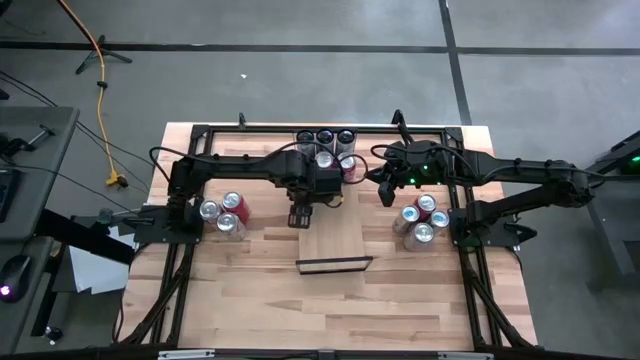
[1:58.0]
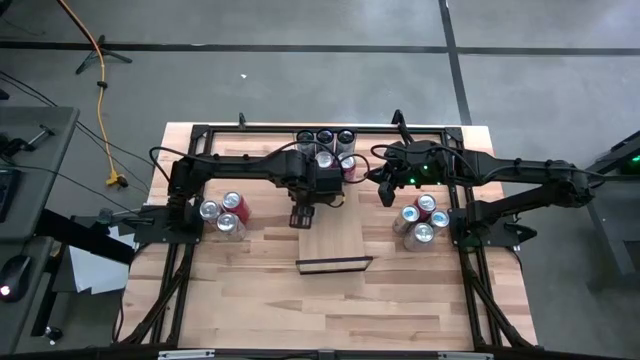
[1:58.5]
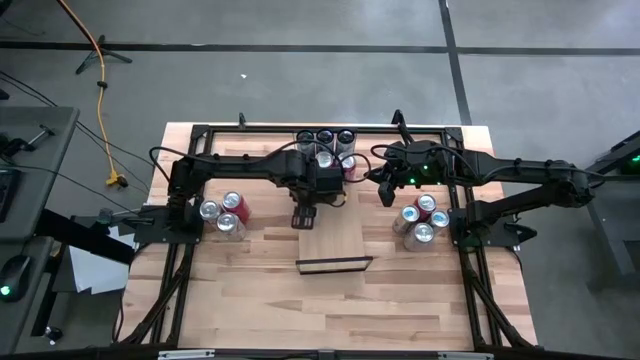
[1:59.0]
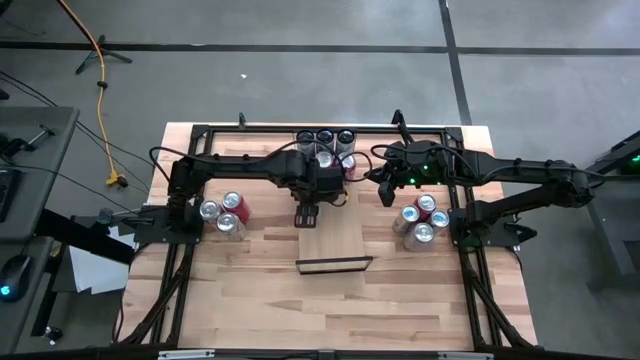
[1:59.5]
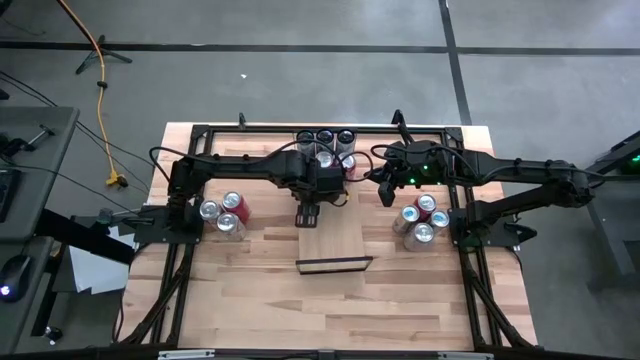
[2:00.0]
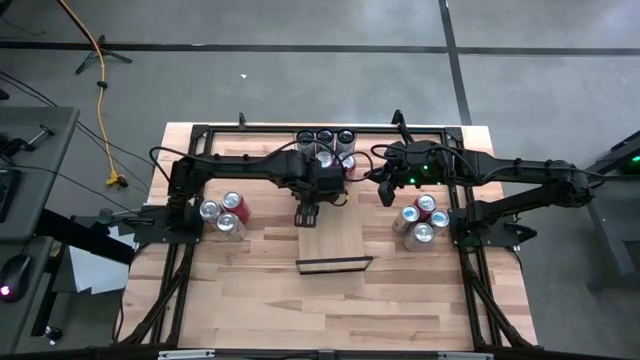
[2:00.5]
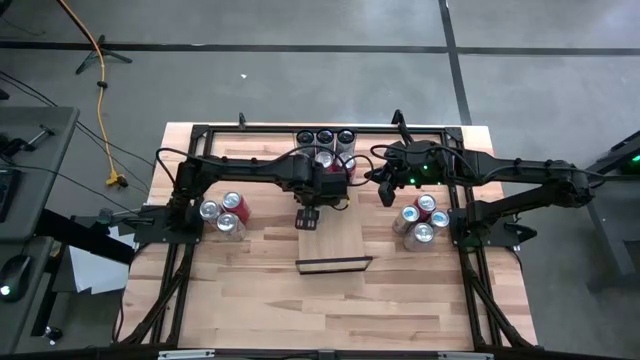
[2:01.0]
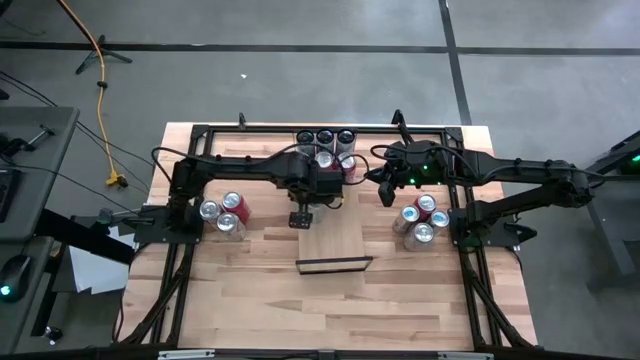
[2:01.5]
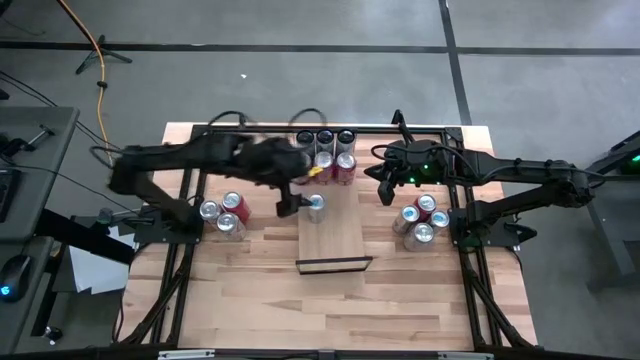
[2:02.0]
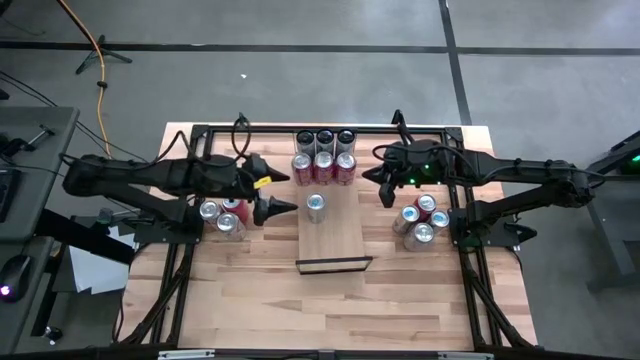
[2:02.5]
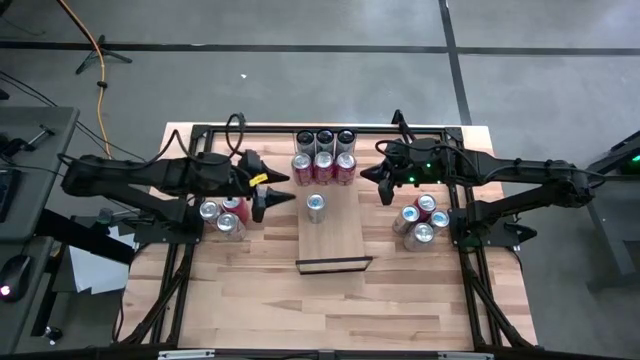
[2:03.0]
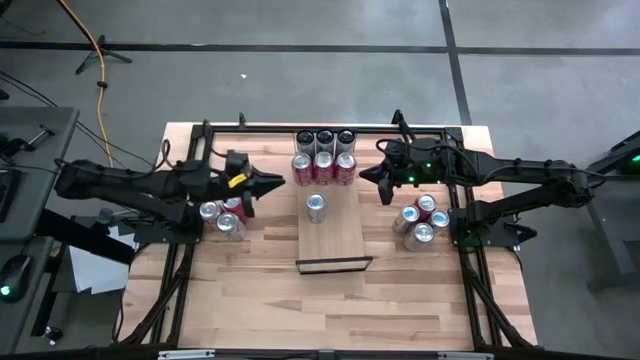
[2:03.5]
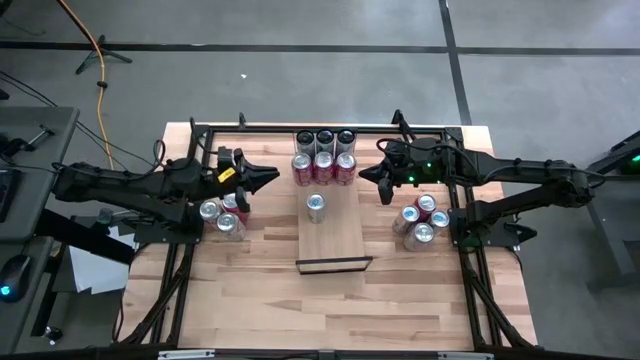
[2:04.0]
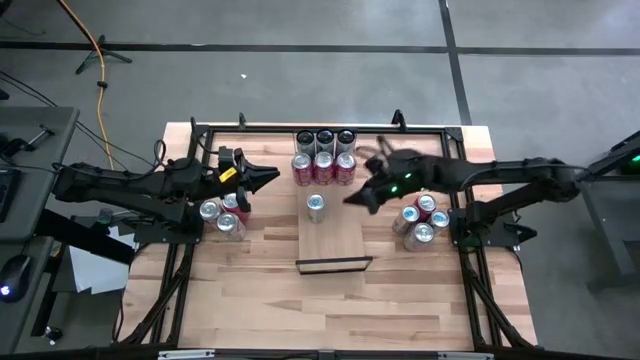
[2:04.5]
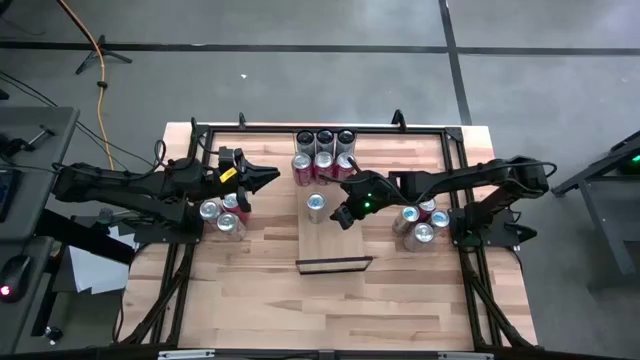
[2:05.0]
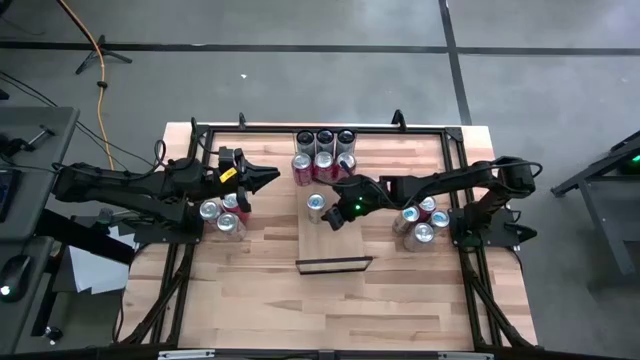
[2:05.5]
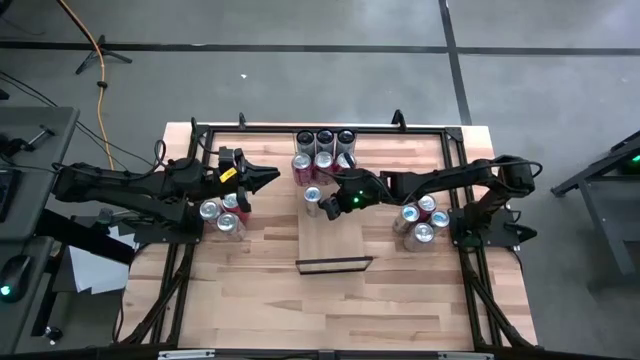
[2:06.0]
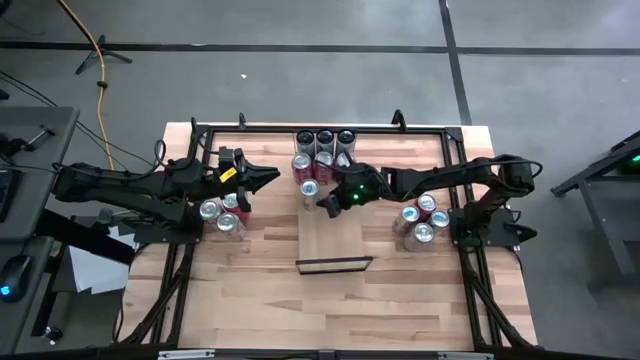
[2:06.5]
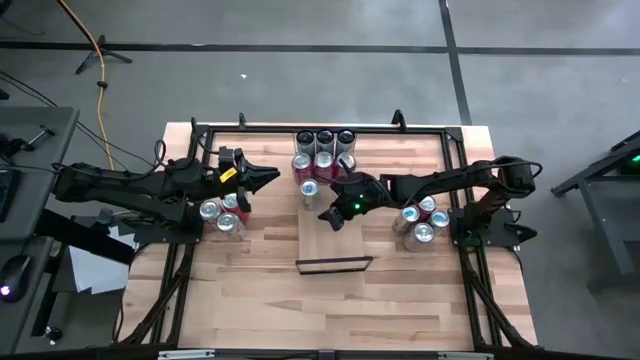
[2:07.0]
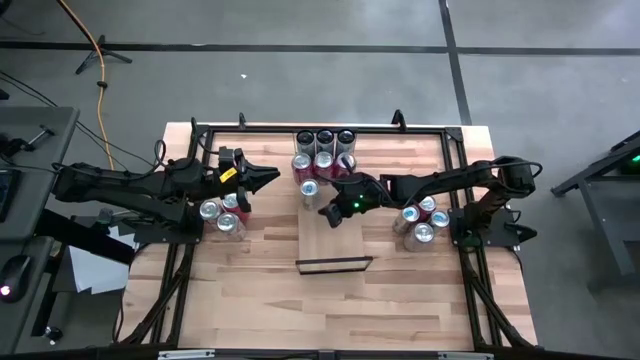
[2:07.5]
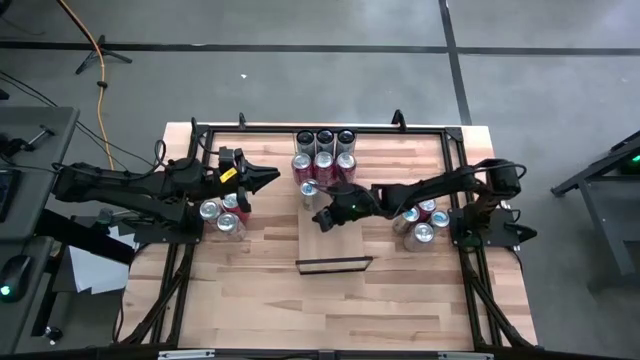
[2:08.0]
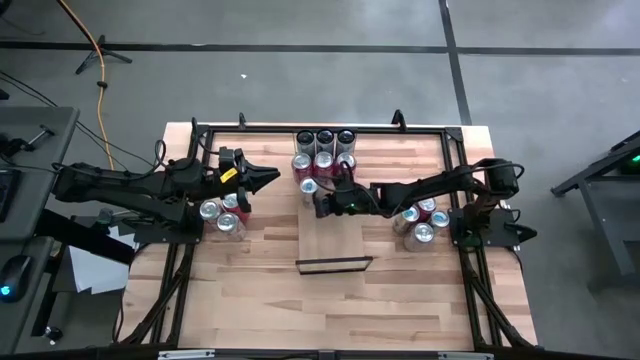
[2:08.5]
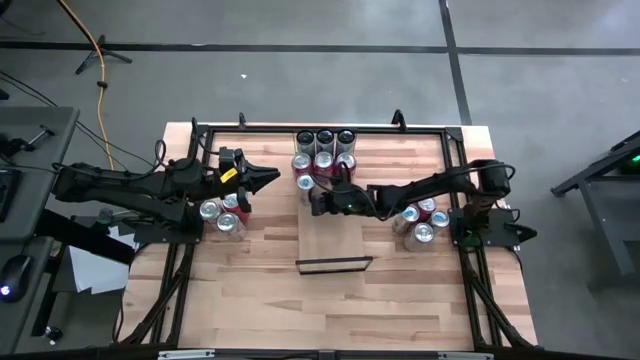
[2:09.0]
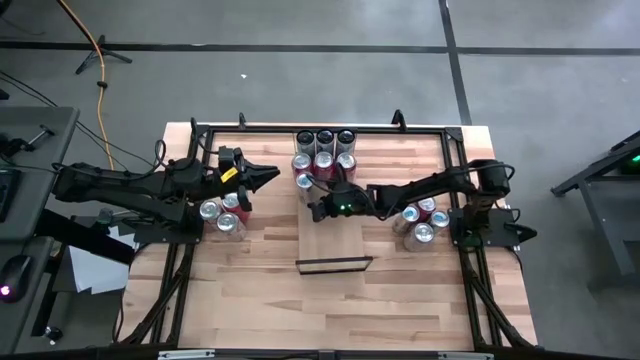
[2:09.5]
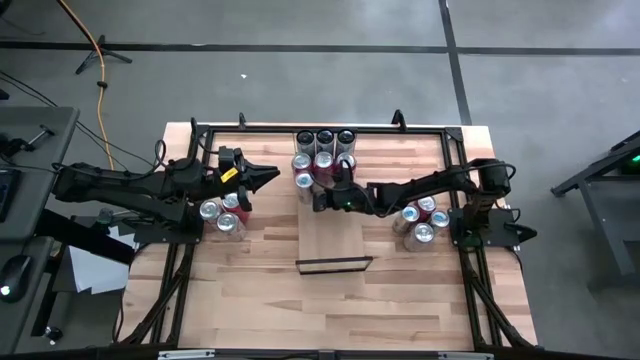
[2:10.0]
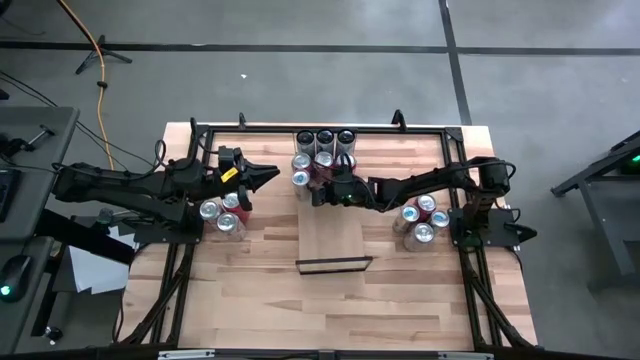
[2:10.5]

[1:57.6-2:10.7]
Task: Place canned beverage on shelf
Put the top left blue soda can on the shelf

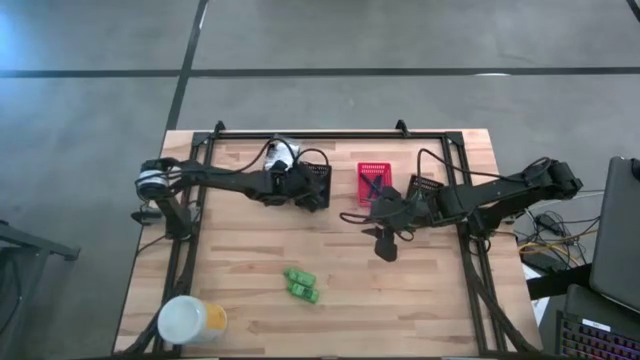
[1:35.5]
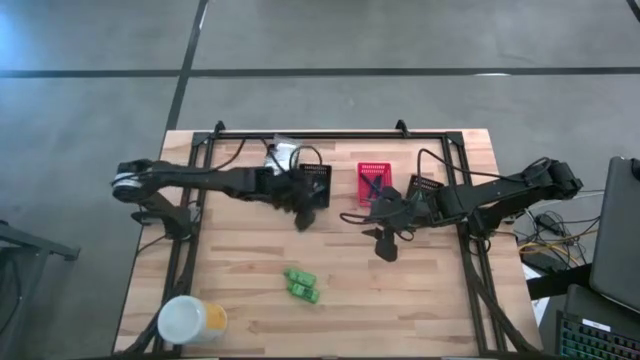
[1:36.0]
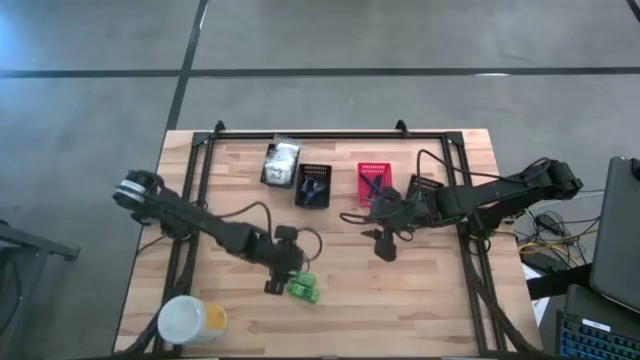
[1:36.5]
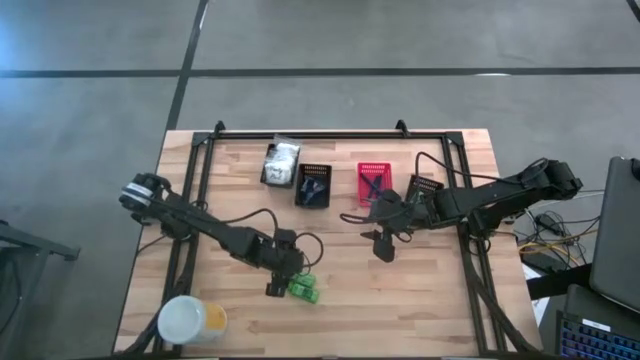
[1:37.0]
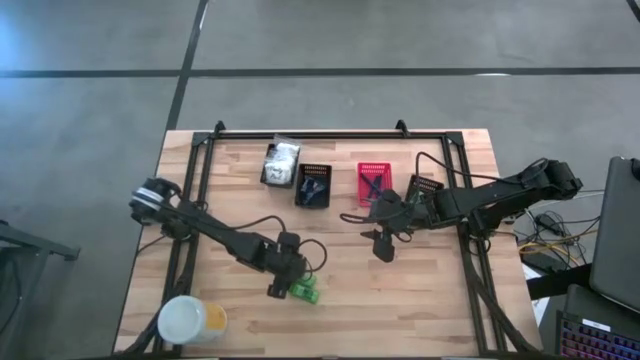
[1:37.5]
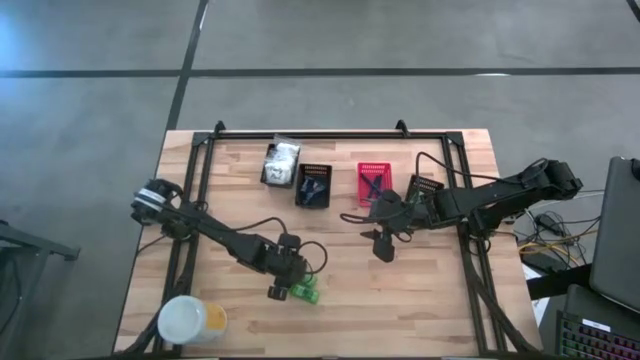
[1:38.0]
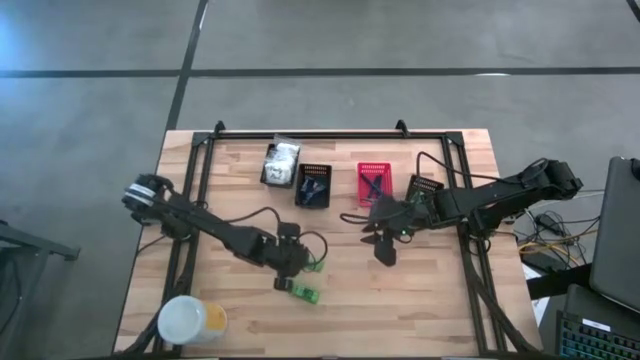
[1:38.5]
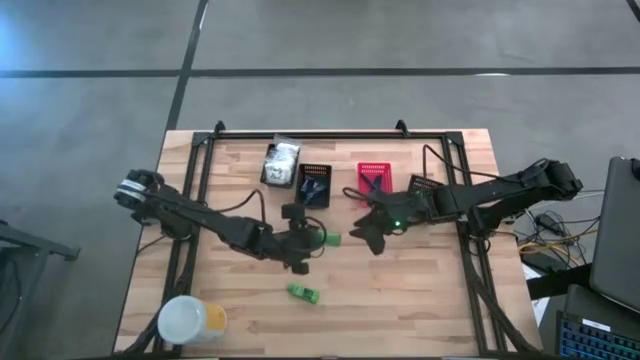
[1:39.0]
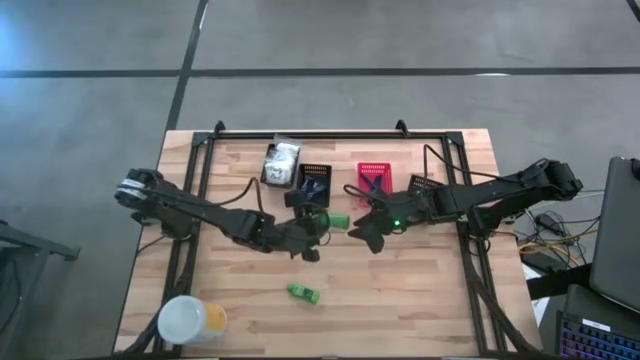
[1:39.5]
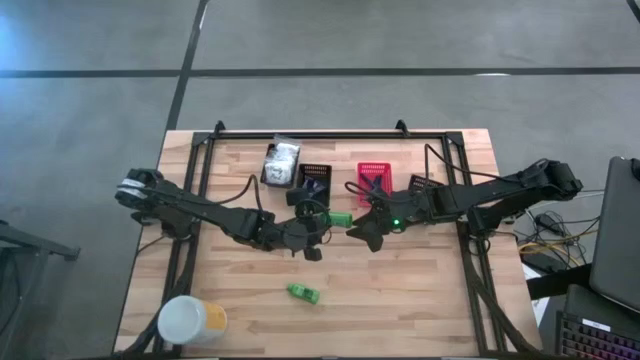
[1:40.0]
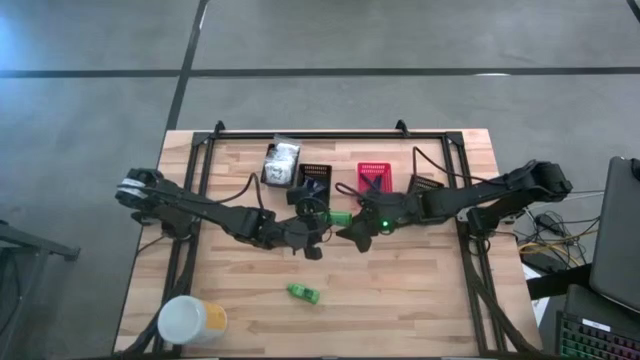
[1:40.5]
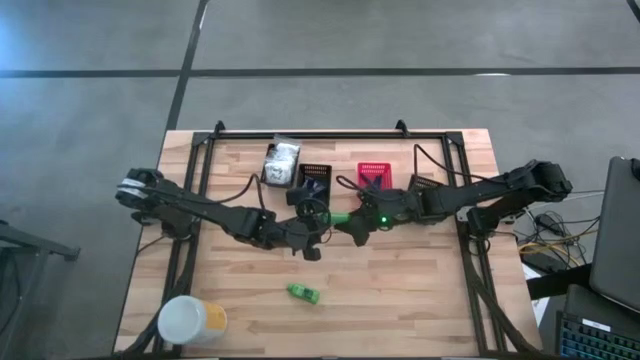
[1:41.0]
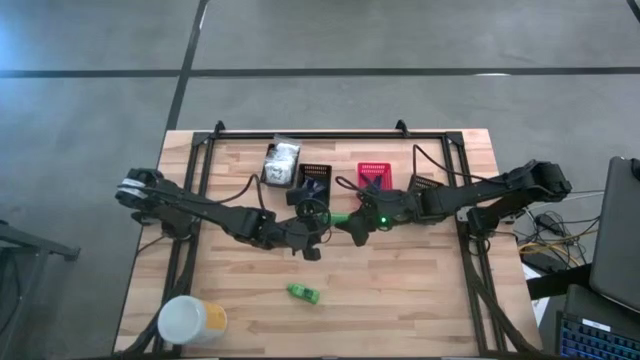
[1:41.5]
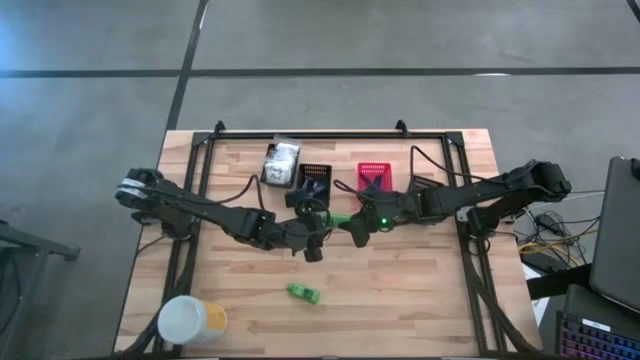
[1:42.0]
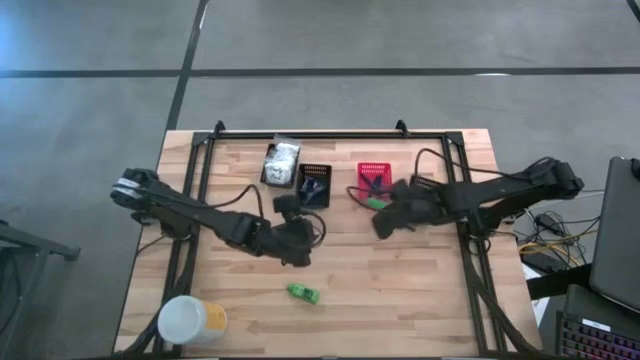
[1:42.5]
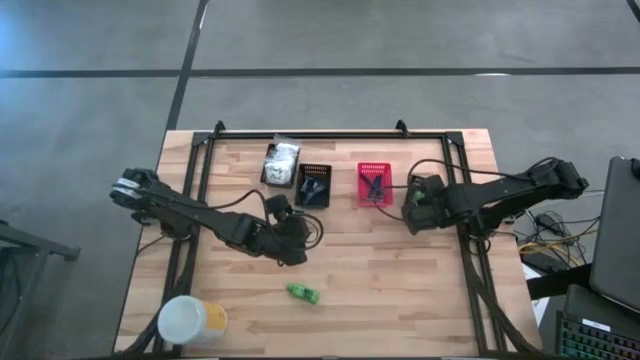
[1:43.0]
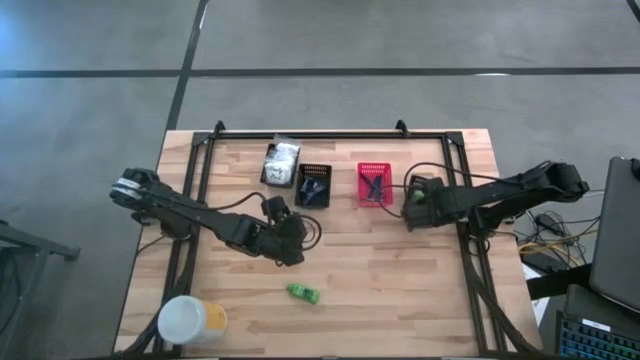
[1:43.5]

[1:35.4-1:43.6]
Task: Pick & Place Travel size toiletries
Put the green shampoo into the right black bin
